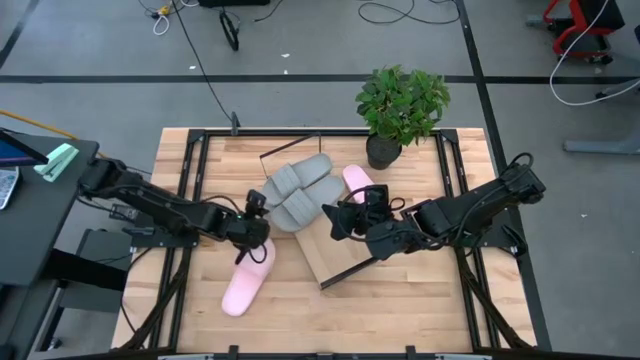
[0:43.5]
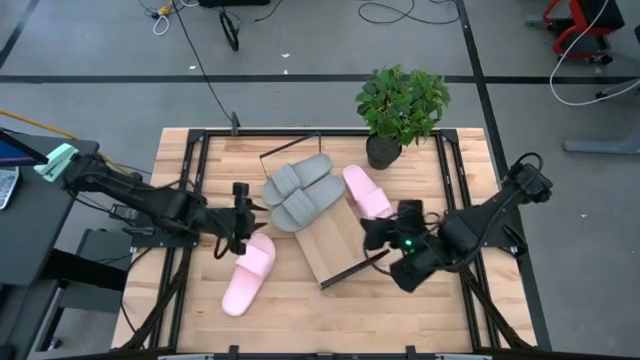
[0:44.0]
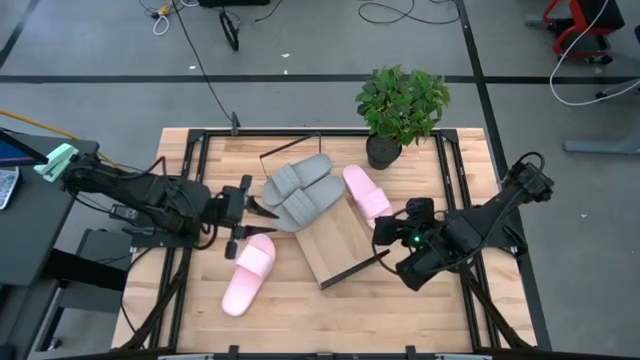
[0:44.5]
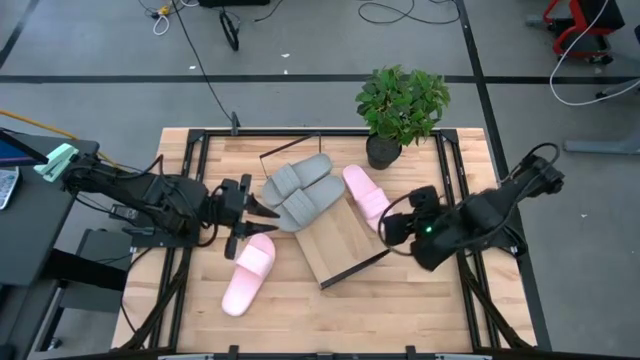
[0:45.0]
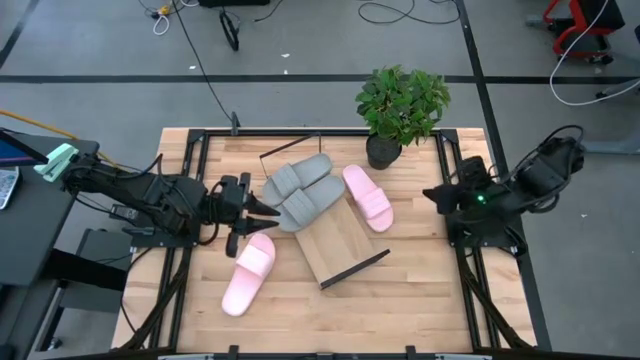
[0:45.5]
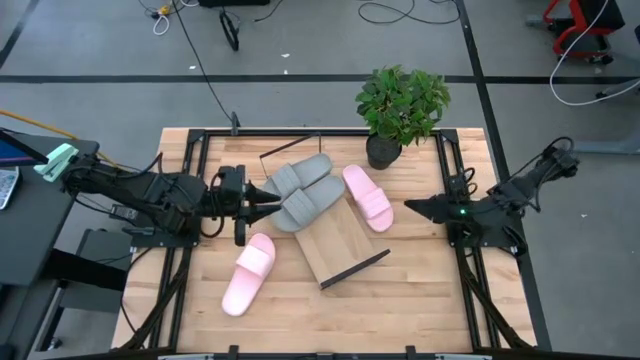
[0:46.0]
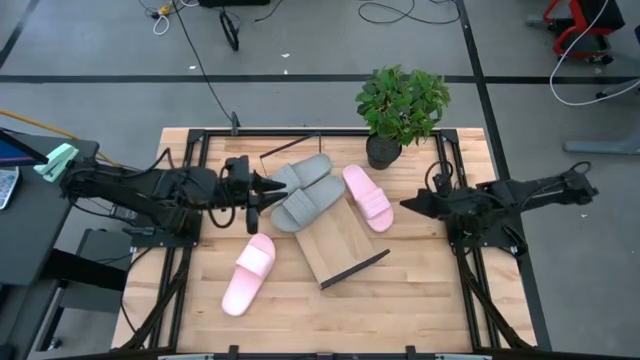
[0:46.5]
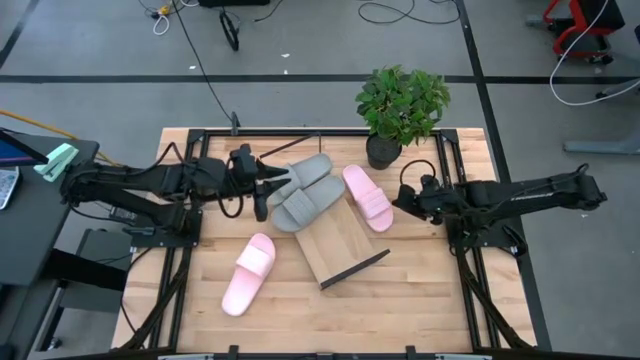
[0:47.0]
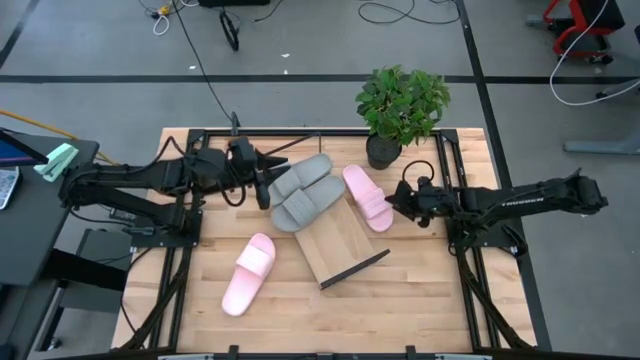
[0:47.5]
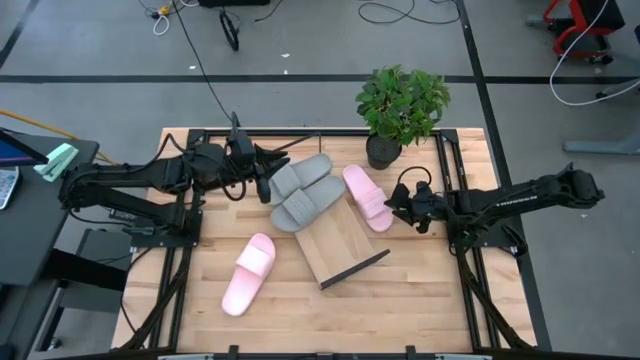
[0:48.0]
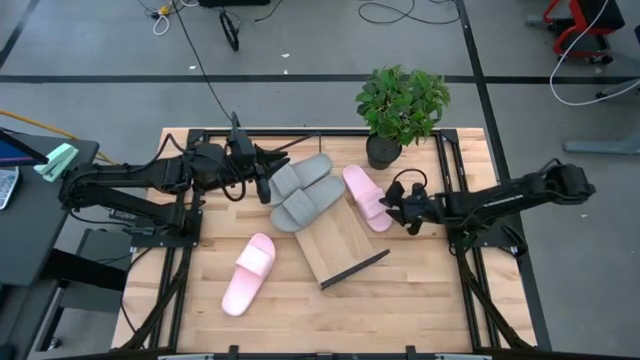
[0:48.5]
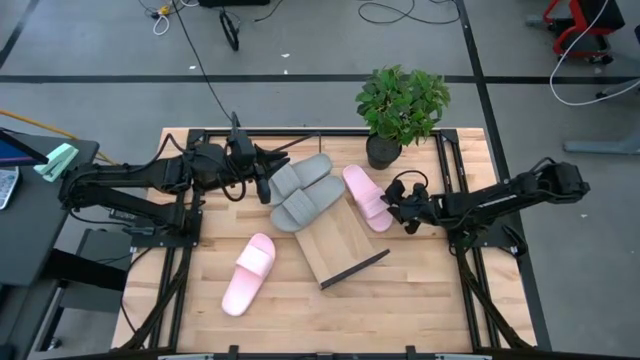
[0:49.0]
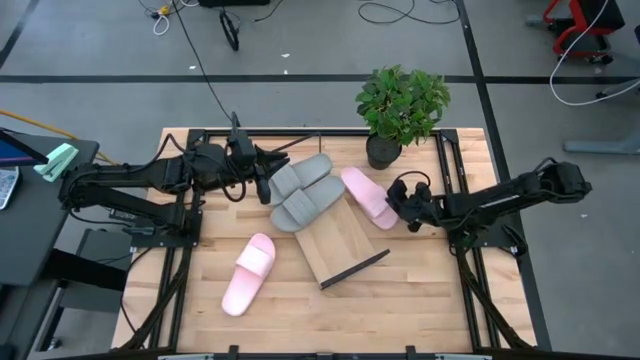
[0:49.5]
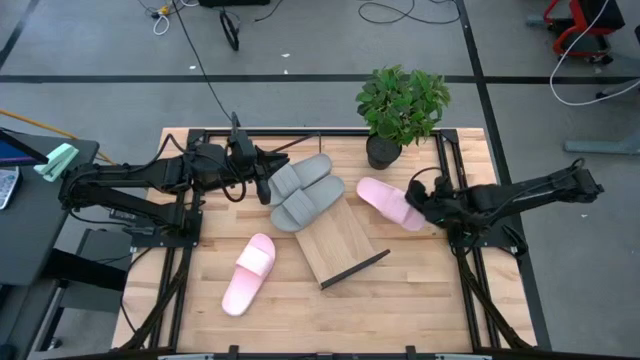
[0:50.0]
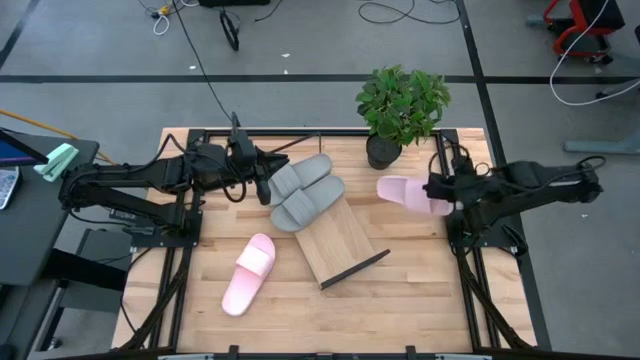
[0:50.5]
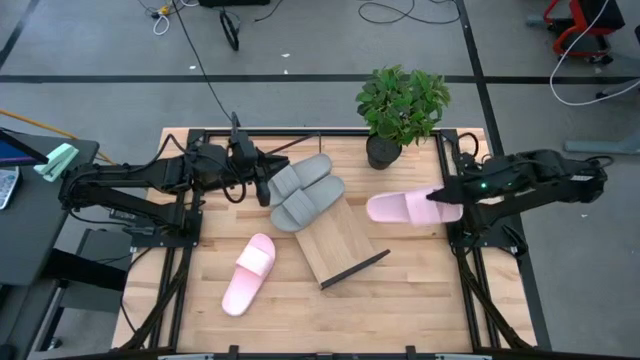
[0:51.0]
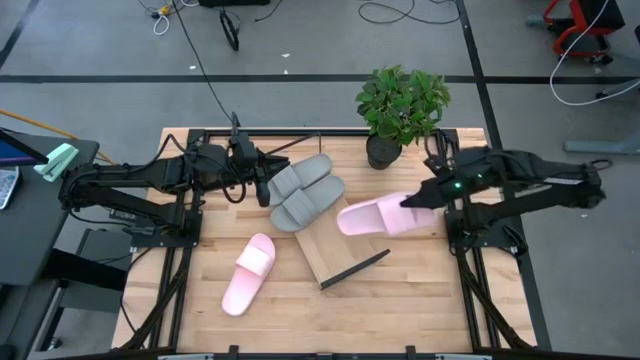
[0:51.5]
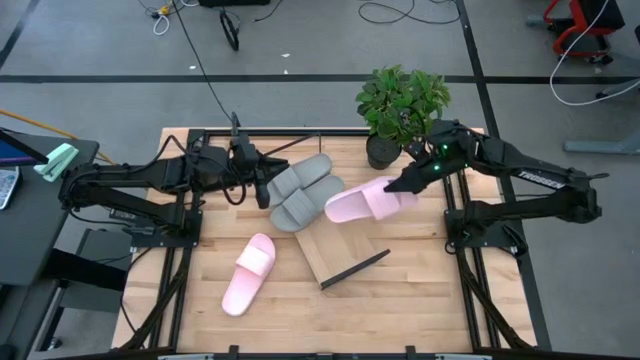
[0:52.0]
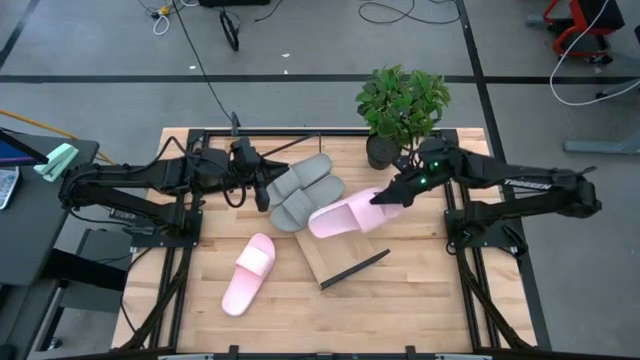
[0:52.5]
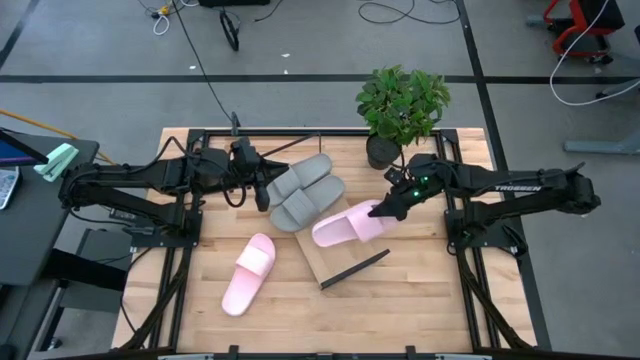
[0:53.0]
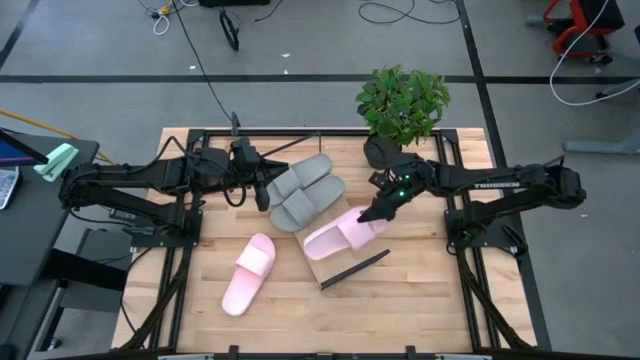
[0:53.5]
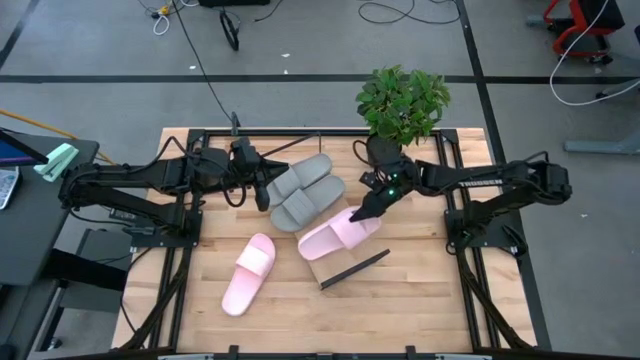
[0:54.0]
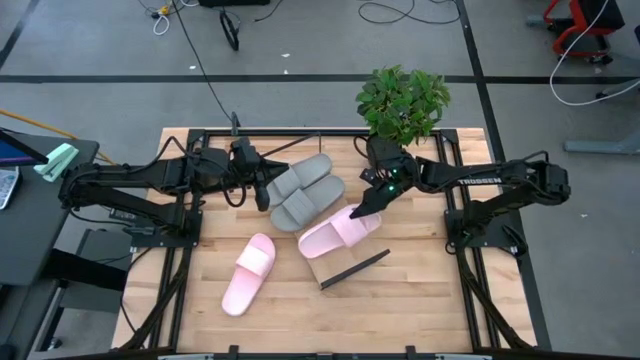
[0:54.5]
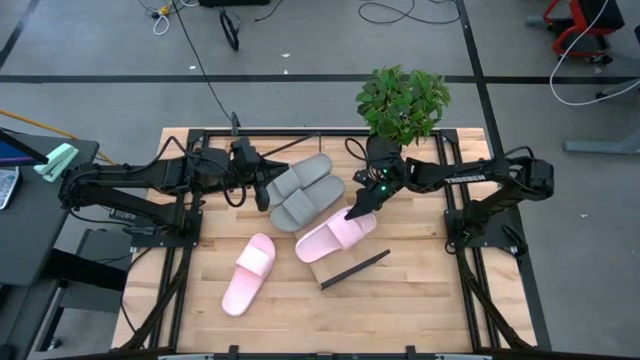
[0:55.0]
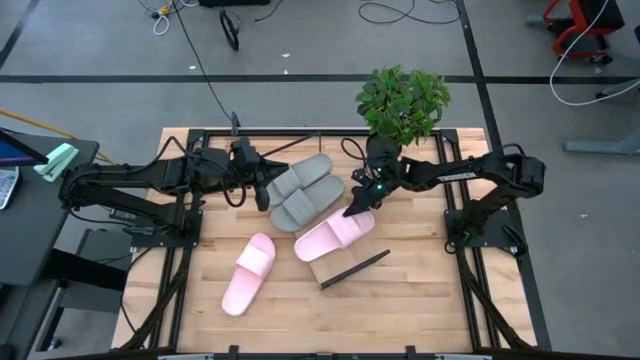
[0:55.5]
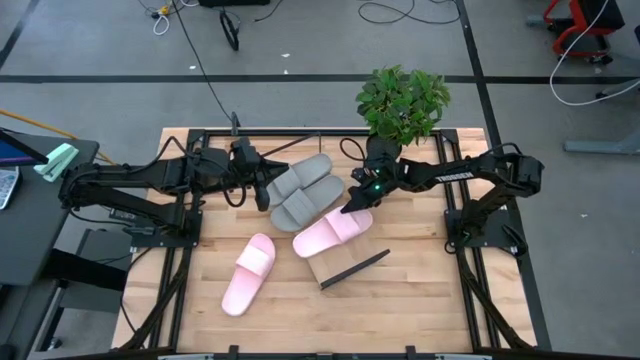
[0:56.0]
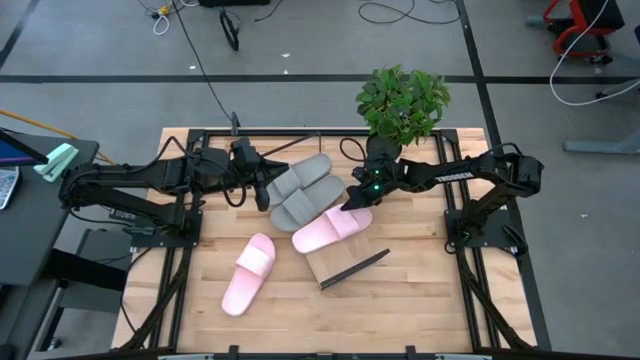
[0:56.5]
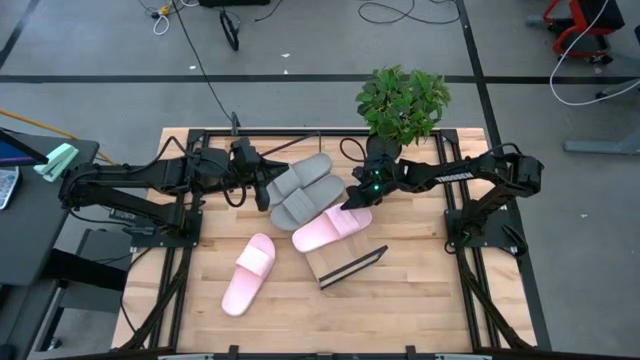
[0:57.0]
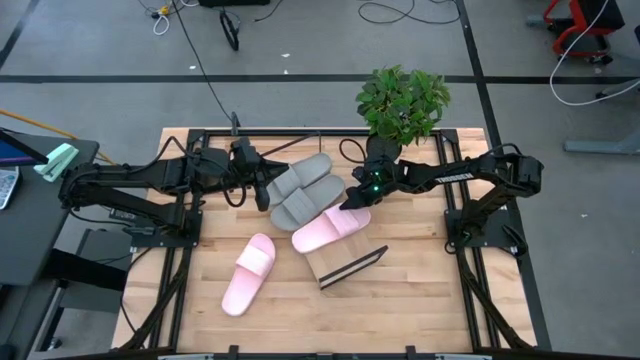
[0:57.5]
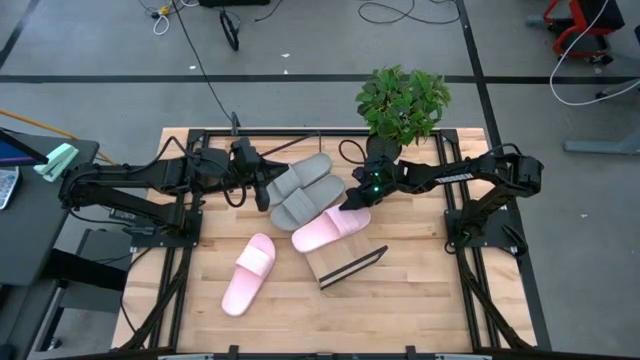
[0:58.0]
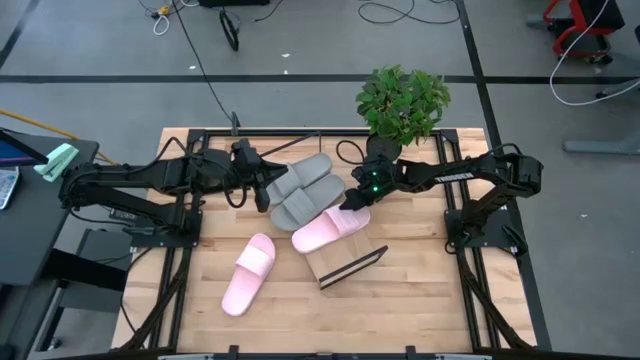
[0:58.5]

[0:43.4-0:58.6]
Task: Pick and place slides into the shelf
Put the top pink slides on the shelf

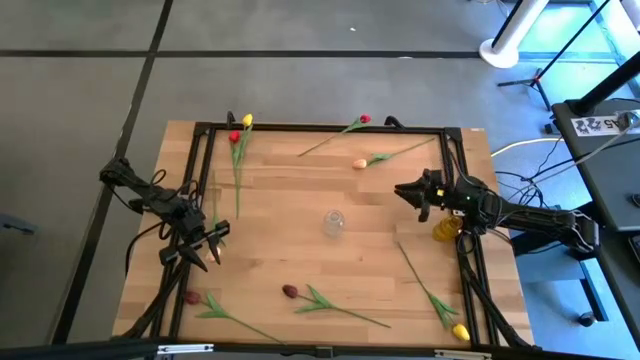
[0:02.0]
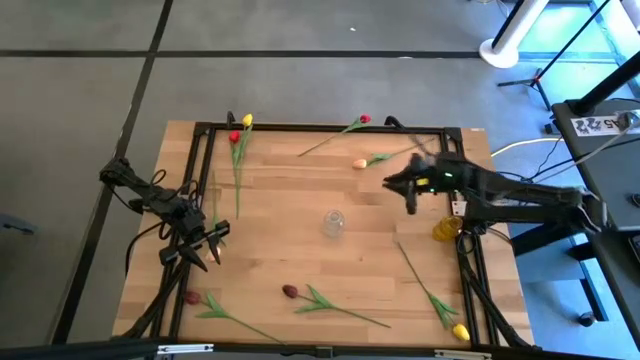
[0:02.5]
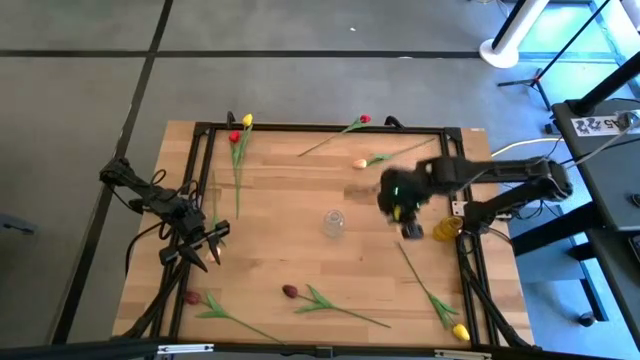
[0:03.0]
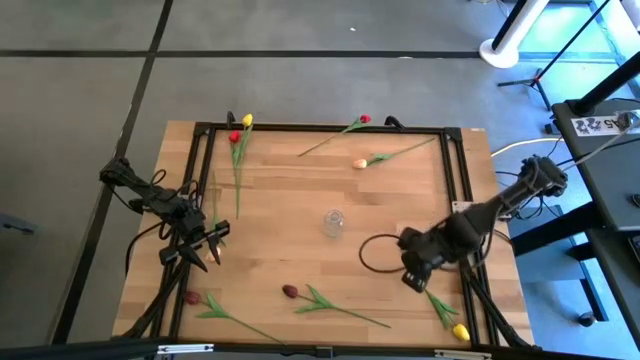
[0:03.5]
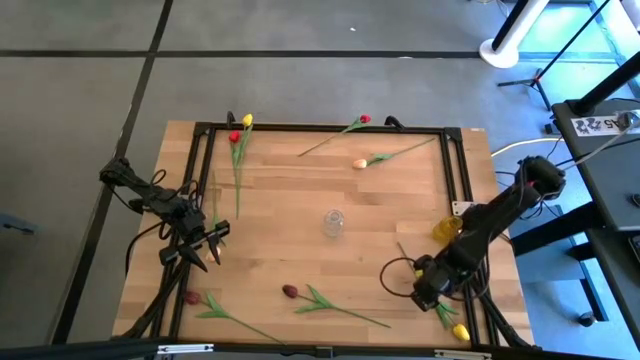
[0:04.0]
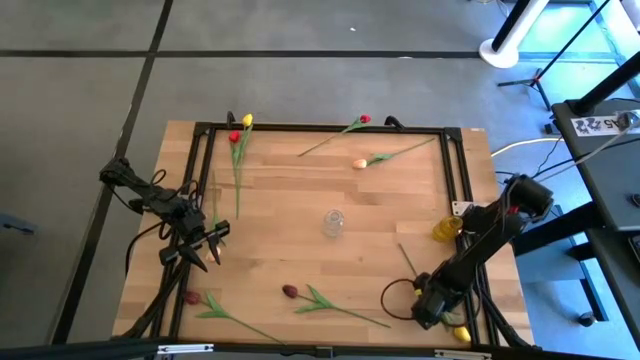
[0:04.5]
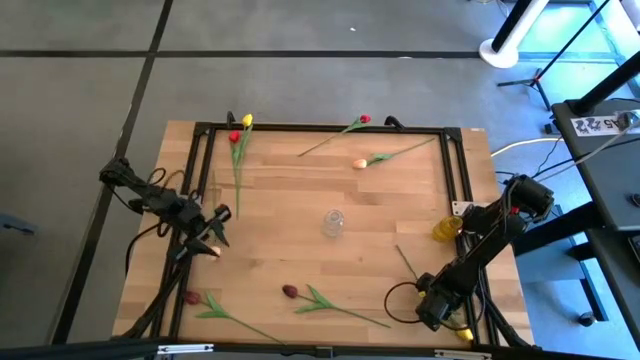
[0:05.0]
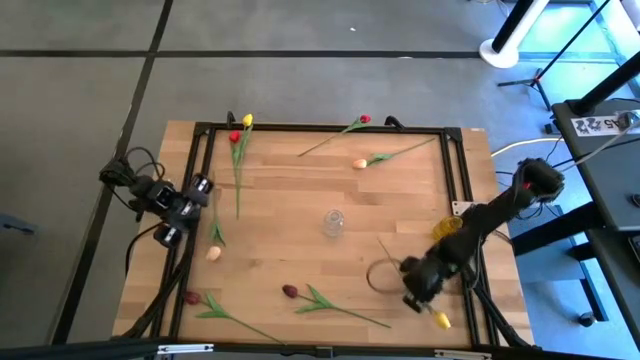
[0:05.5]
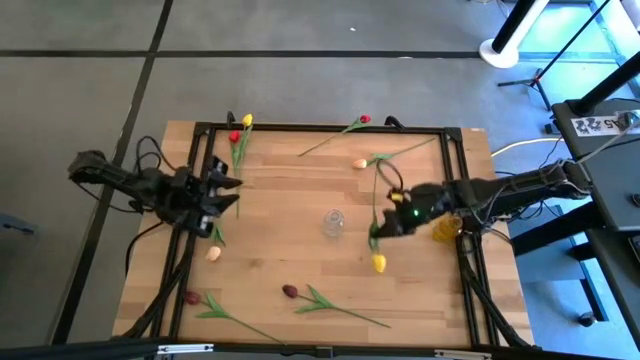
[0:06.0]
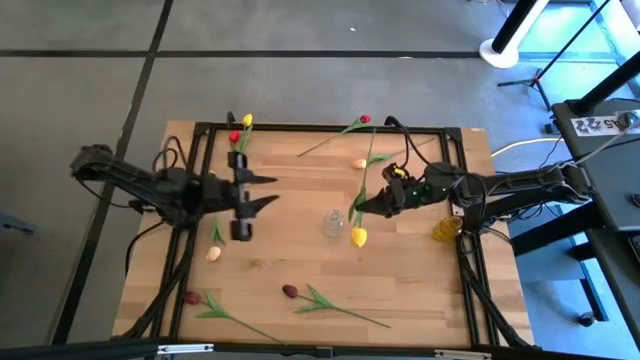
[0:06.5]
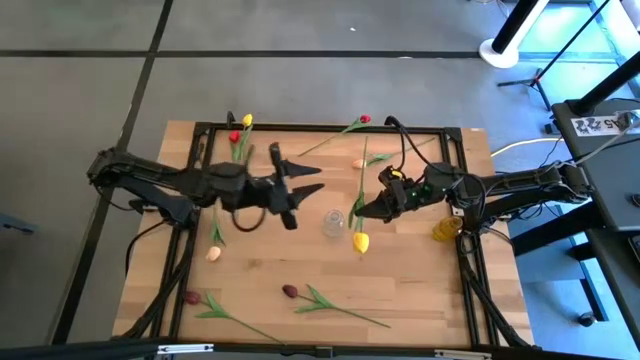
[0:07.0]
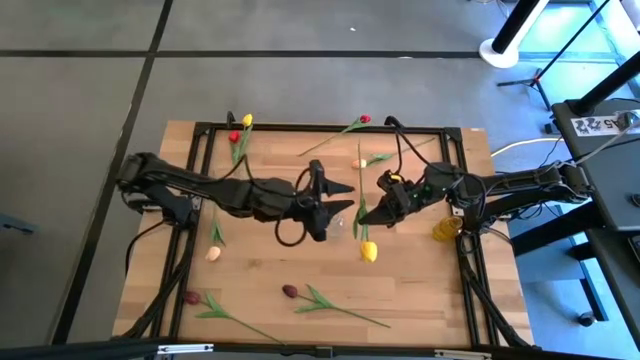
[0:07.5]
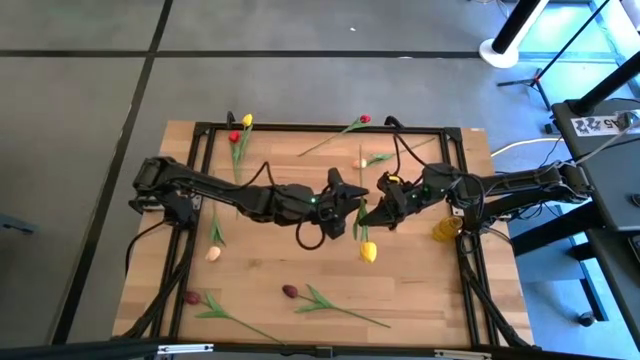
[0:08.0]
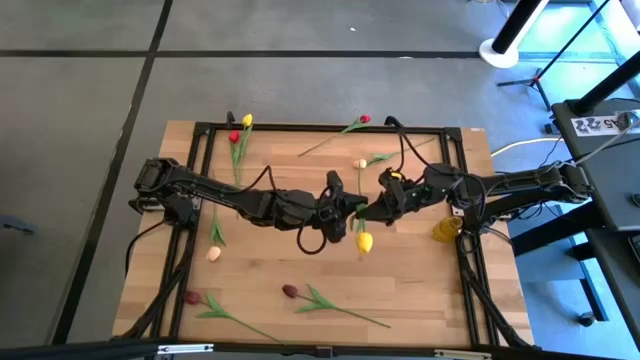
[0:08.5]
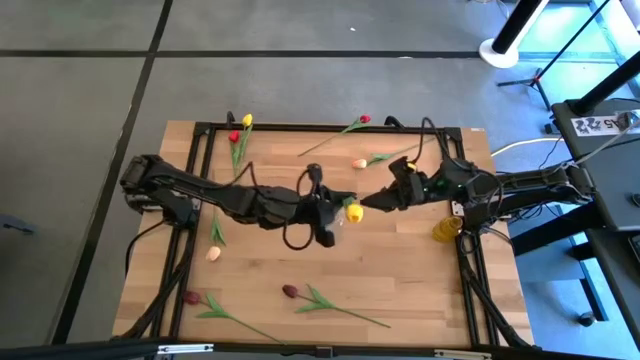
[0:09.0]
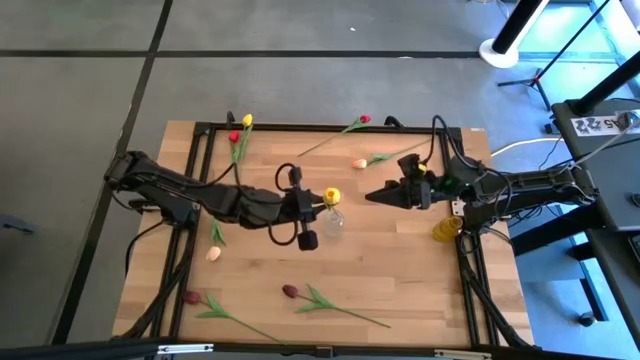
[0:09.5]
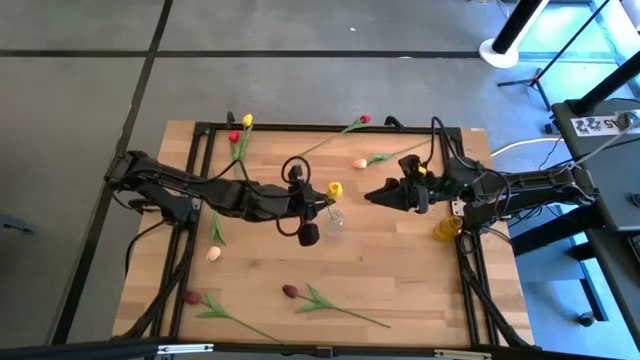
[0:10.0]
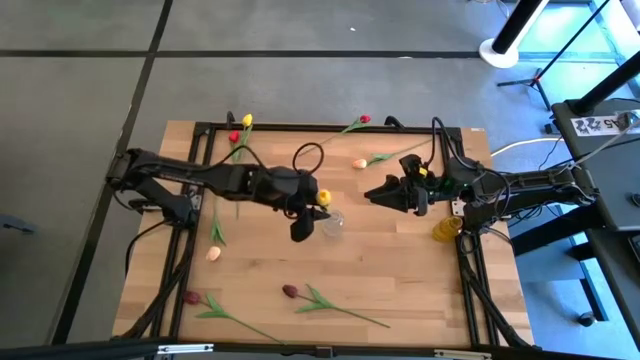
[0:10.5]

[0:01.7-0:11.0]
Task: Sort flowers into vase by color
Put the bottom yellow tulip into the transparent vase
